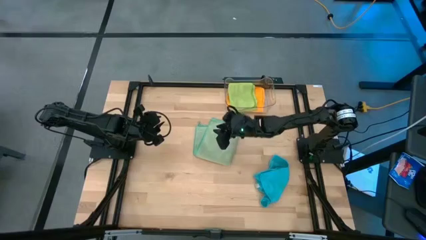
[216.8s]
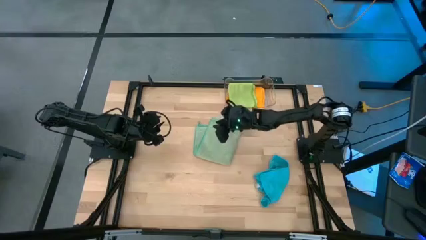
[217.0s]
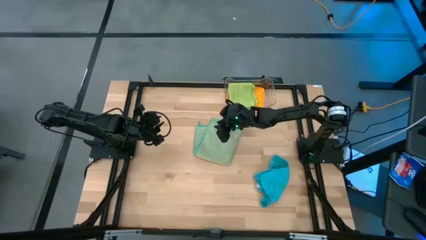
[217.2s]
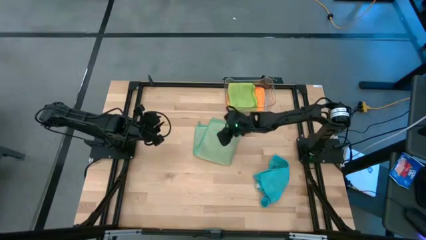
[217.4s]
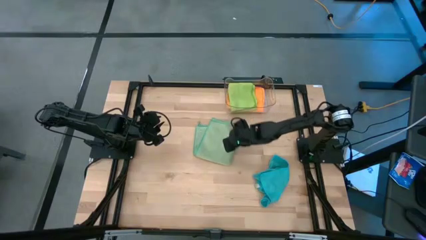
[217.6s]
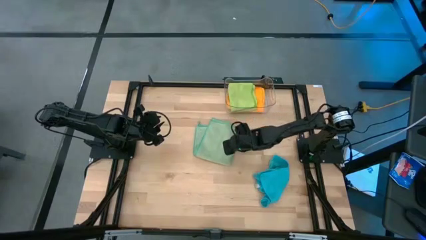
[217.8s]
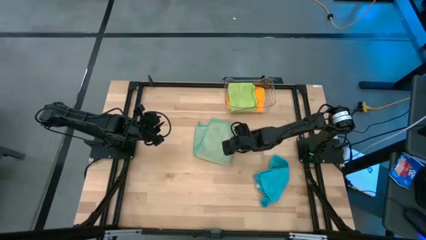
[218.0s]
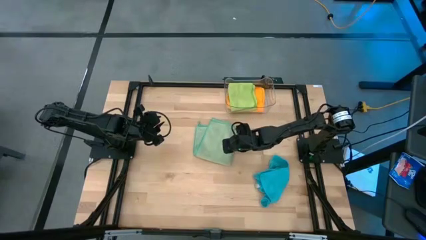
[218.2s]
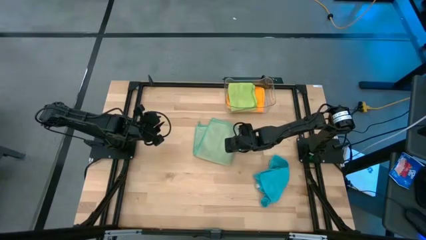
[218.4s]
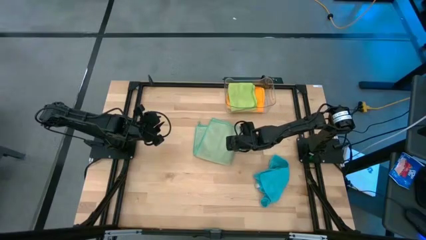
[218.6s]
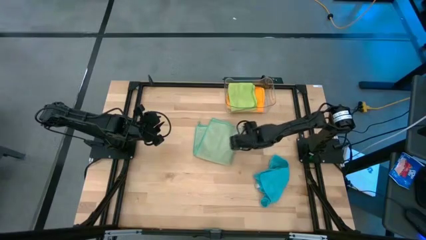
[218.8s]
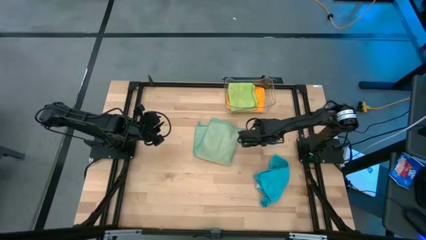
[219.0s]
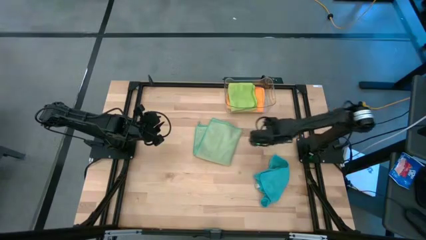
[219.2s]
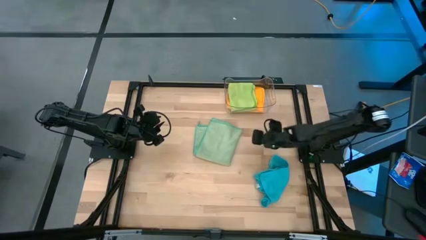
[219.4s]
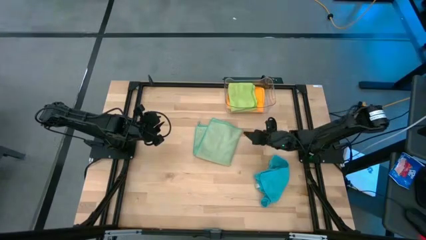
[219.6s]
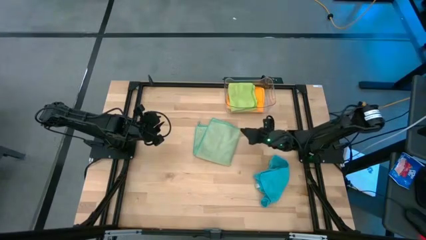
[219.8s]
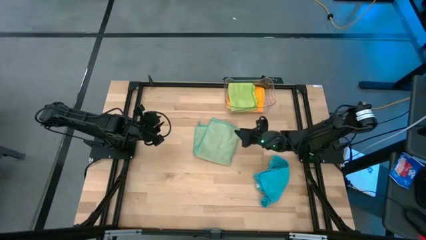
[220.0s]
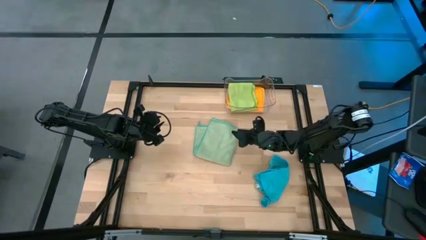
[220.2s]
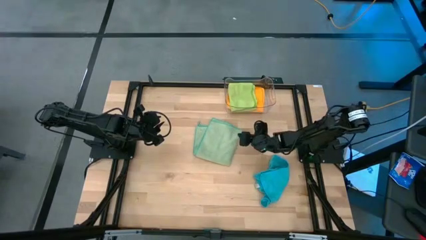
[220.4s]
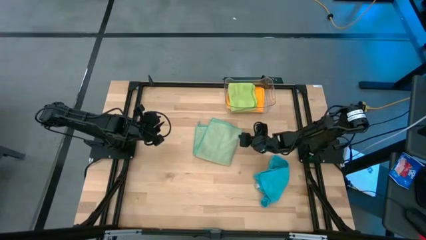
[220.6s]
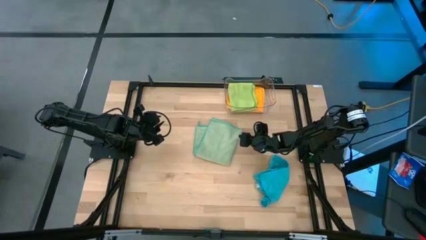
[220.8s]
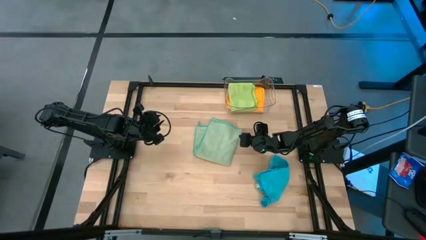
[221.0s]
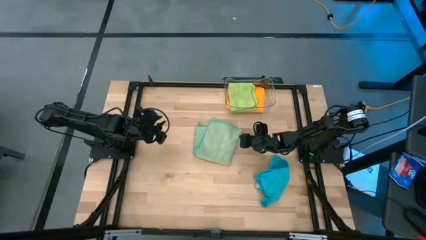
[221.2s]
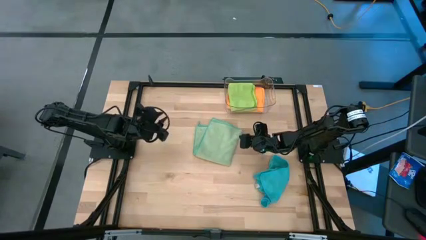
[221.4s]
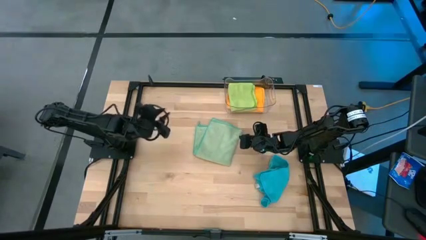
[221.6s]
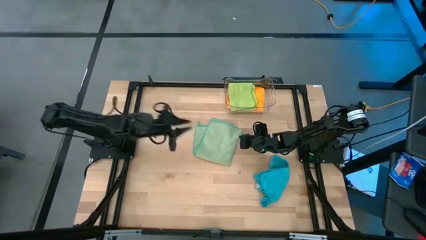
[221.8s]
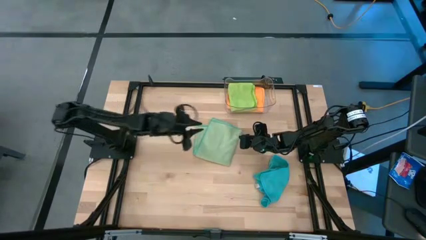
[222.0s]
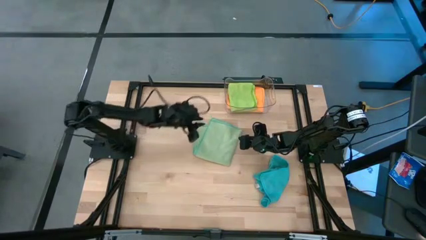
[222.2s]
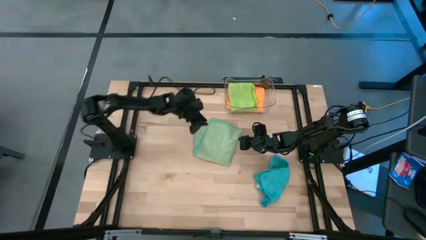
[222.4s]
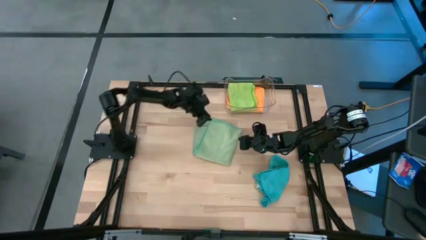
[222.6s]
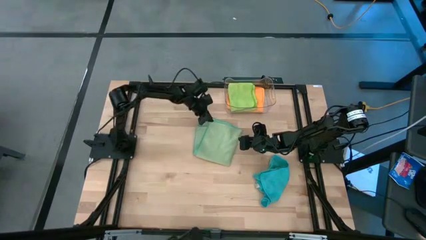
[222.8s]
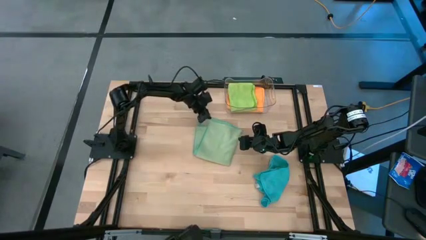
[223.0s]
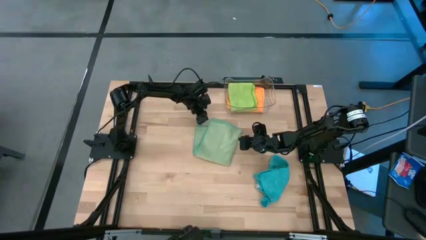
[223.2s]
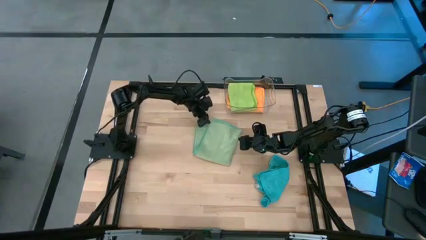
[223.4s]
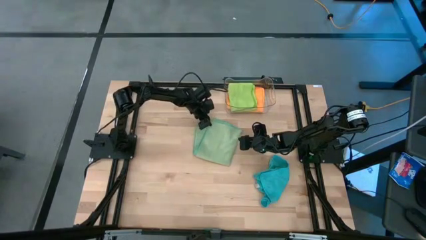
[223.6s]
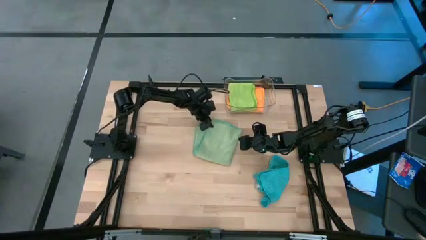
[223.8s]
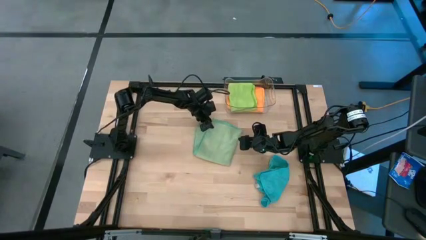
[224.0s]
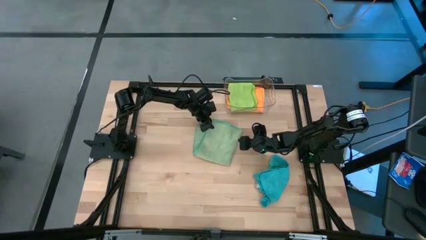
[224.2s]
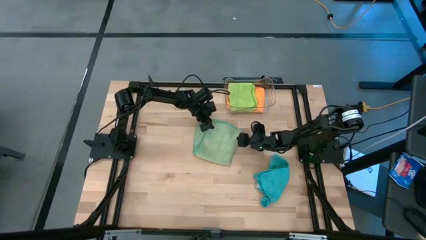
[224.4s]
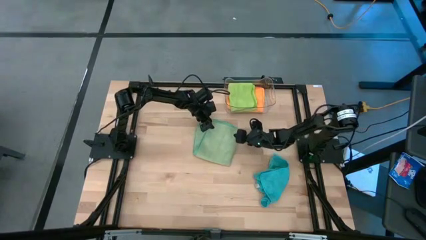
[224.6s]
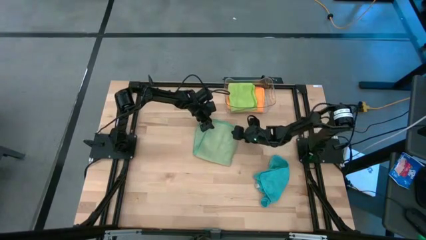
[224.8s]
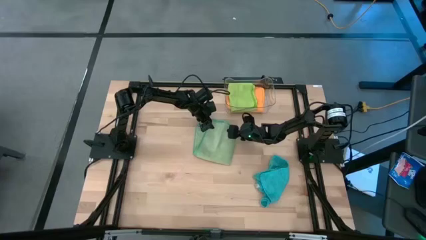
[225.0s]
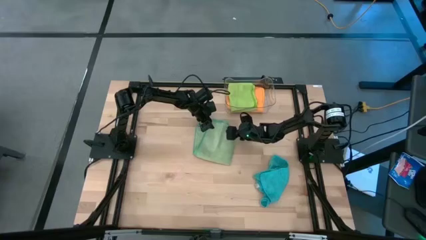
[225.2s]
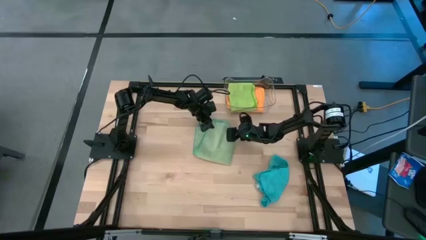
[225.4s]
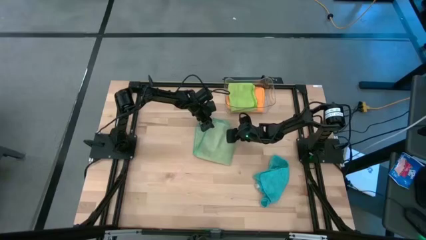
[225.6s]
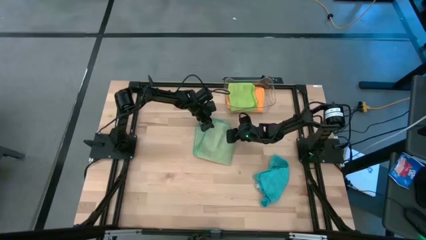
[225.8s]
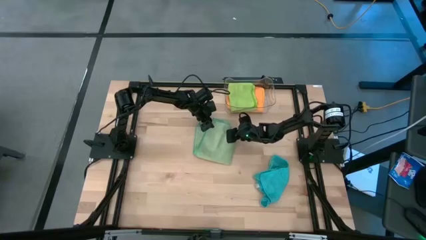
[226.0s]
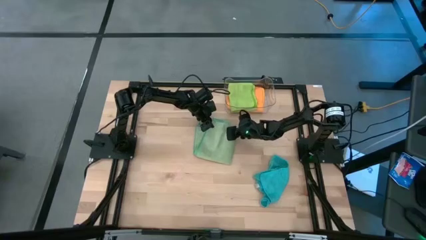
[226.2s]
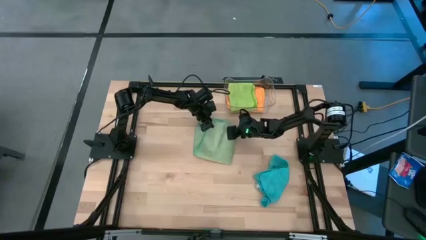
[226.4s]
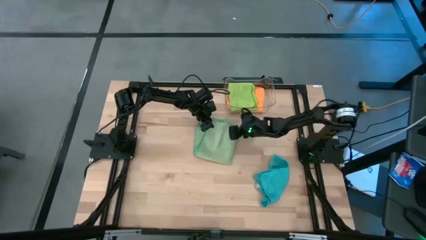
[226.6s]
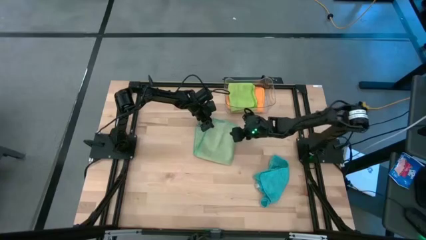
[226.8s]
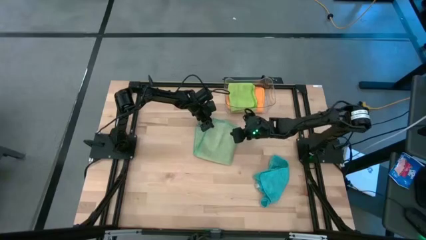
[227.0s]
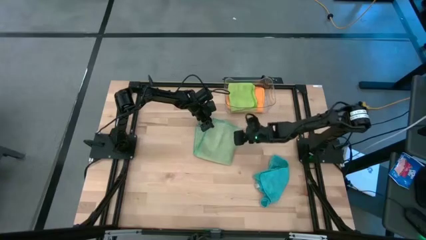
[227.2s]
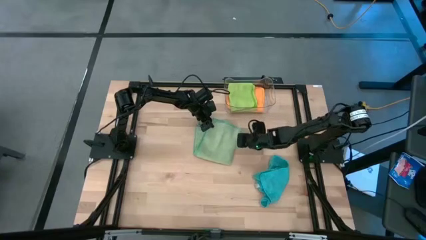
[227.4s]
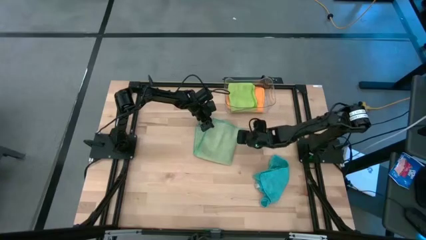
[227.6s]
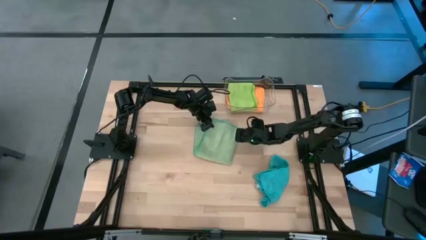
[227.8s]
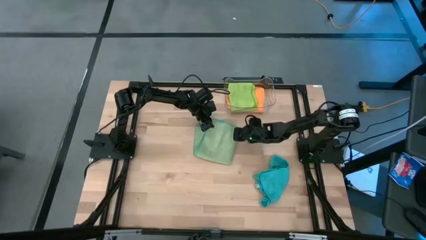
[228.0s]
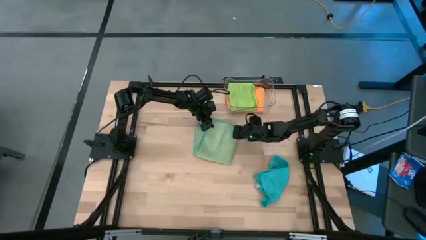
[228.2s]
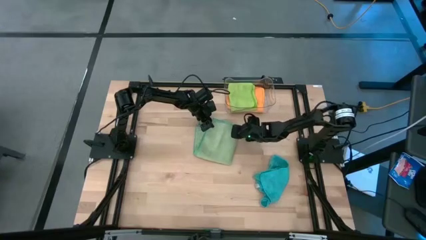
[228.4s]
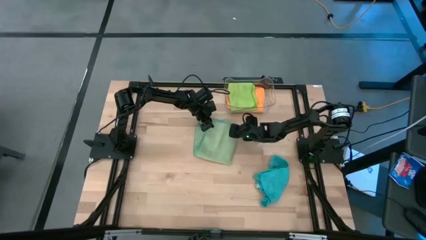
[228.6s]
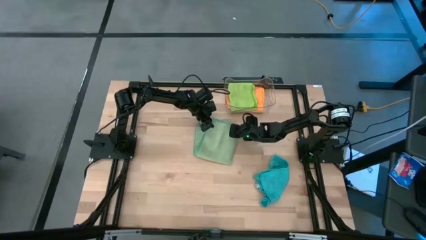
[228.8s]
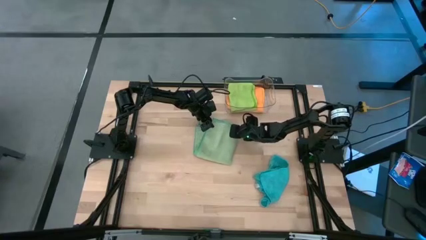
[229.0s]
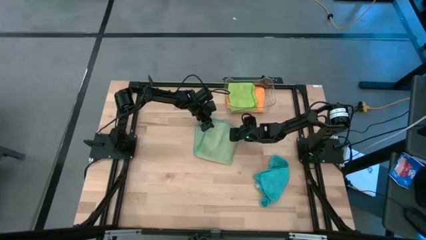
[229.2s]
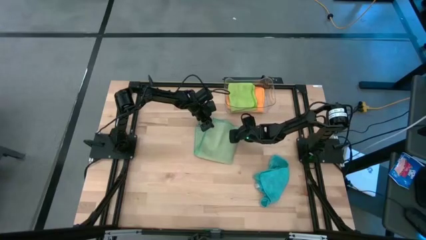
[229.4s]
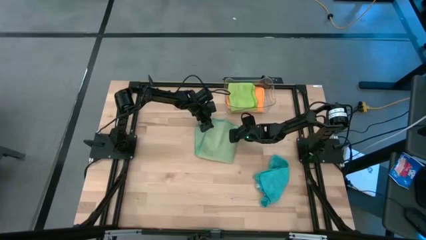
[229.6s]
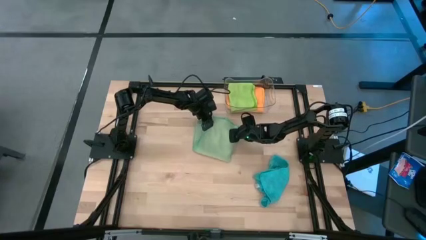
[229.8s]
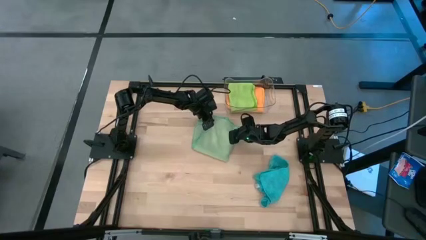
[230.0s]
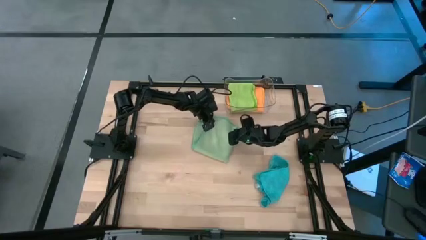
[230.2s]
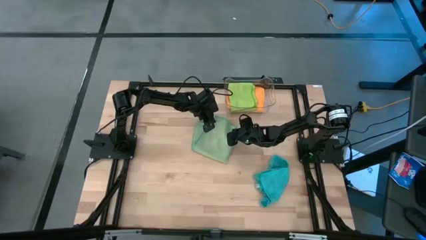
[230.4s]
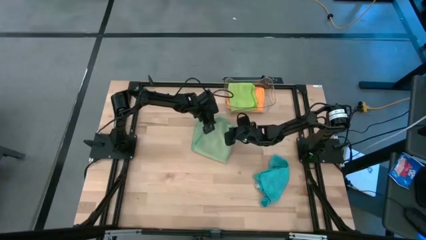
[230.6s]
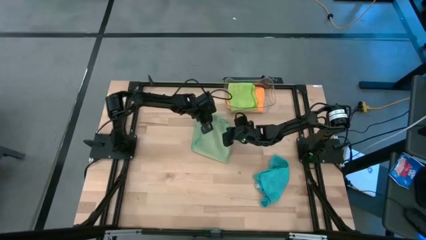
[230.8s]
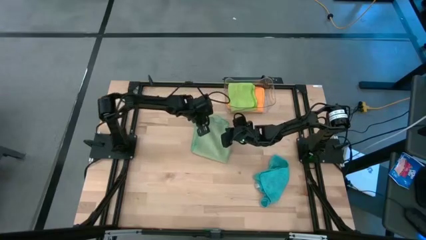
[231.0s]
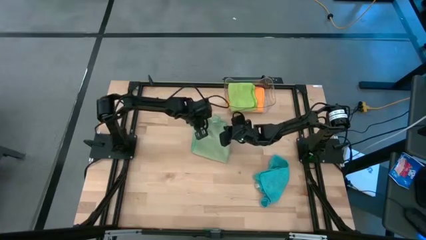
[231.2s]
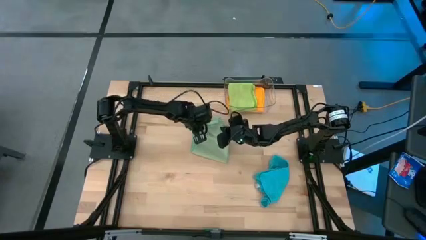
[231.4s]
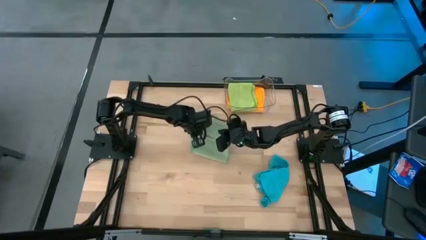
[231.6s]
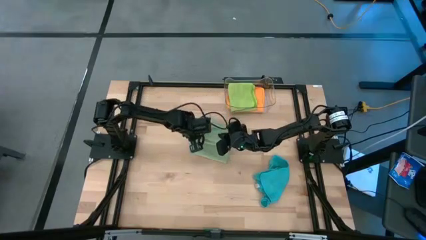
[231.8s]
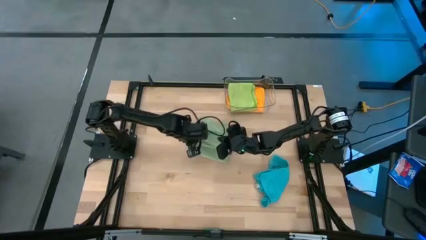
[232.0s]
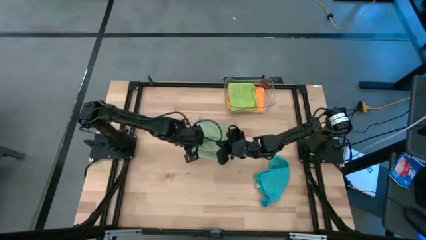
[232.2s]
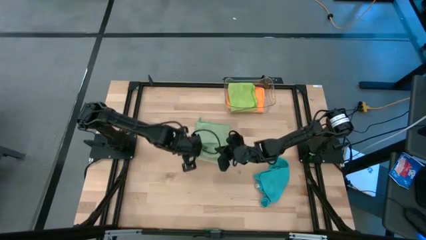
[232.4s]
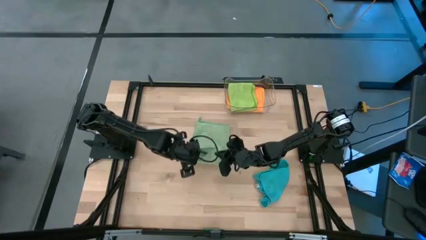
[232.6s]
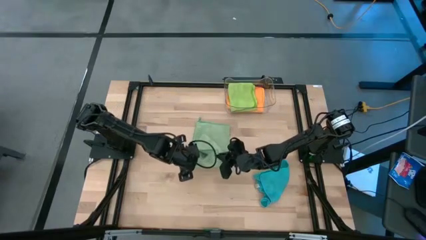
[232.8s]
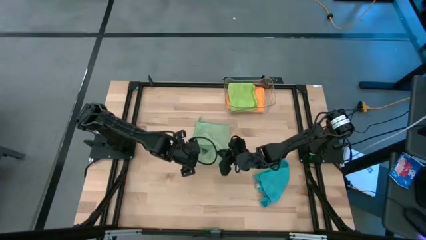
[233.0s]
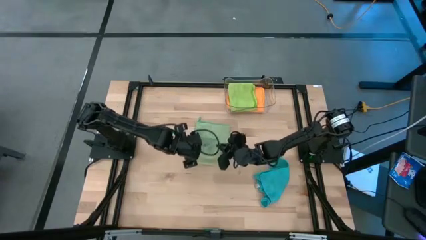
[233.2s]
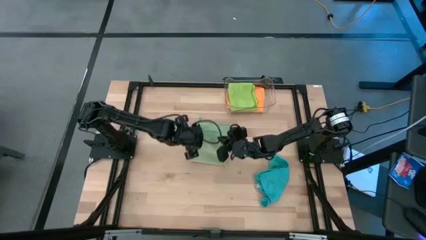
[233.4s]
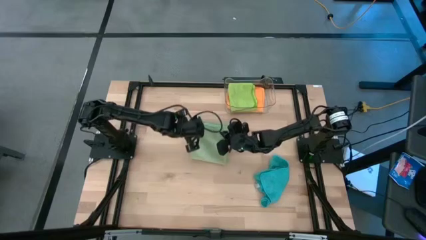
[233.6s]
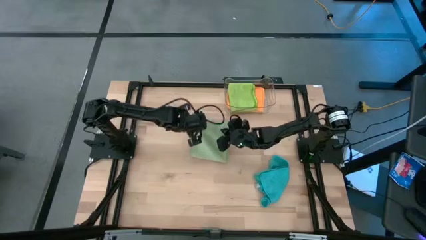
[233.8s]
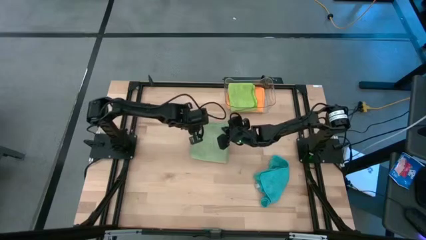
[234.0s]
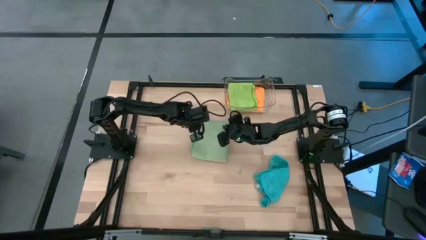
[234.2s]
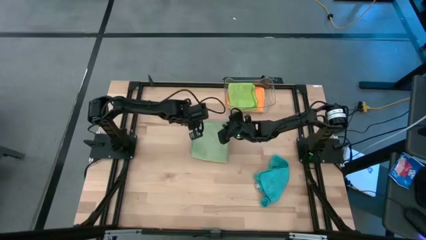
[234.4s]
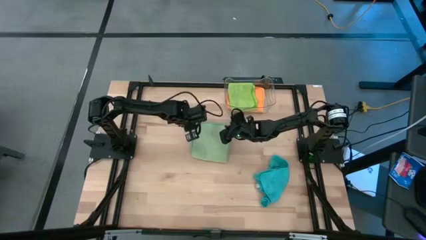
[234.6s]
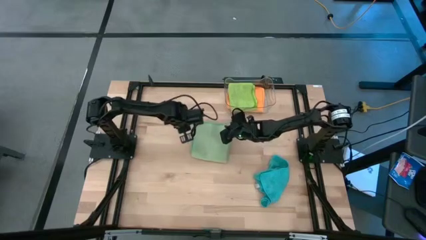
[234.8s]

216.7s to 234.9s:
Task: Fold microfiber towels
Fold the green microfiber towel
